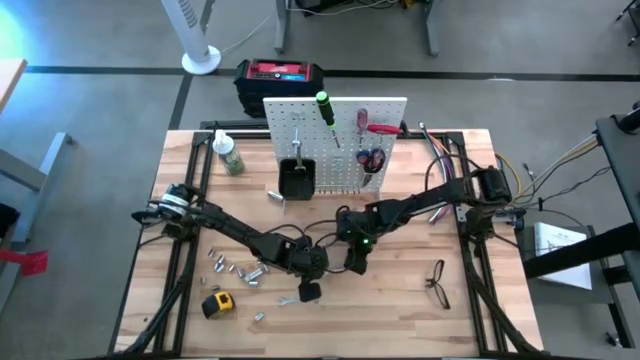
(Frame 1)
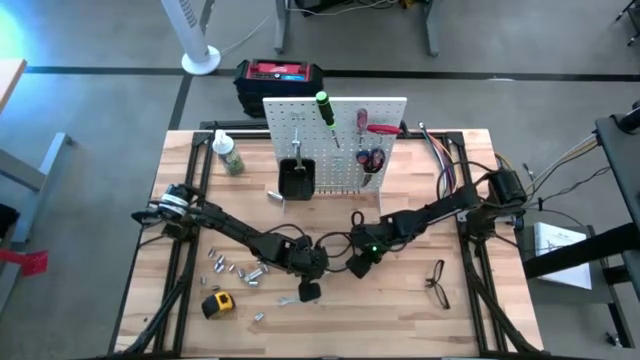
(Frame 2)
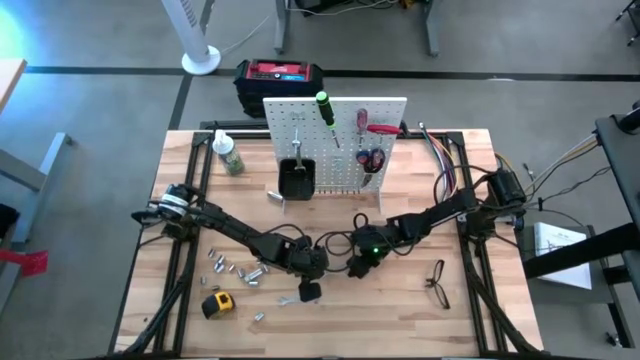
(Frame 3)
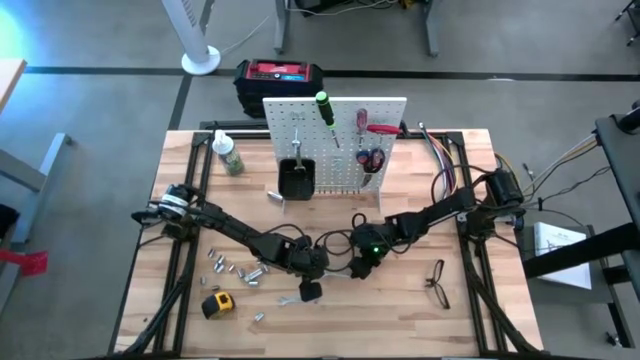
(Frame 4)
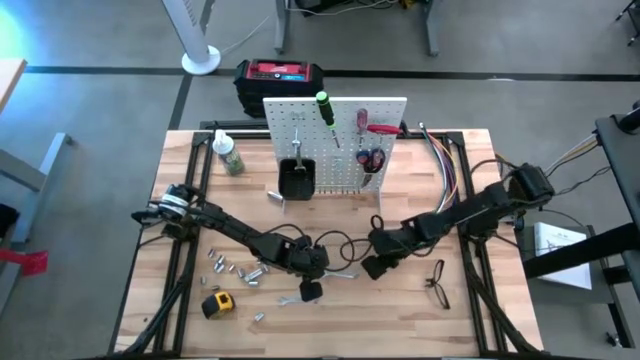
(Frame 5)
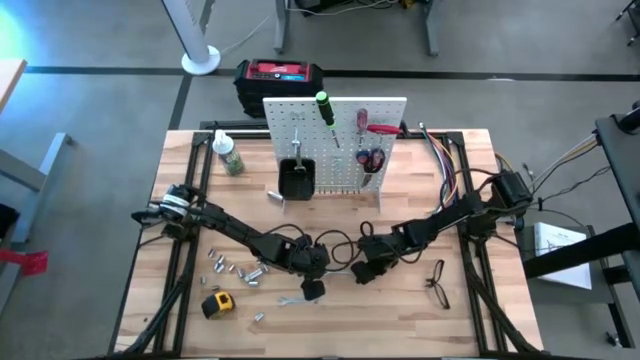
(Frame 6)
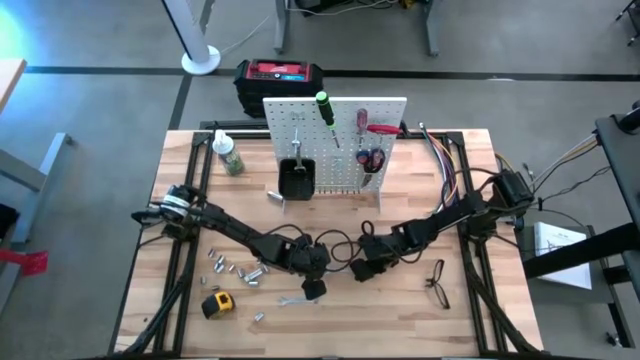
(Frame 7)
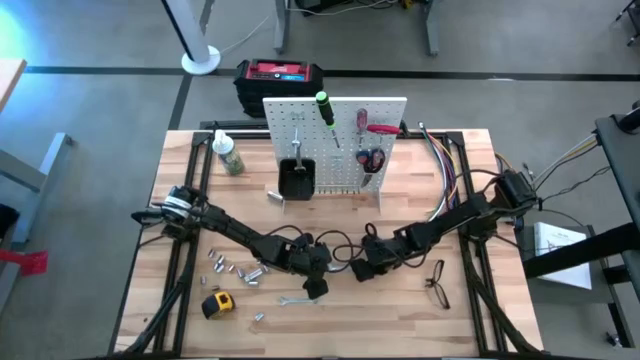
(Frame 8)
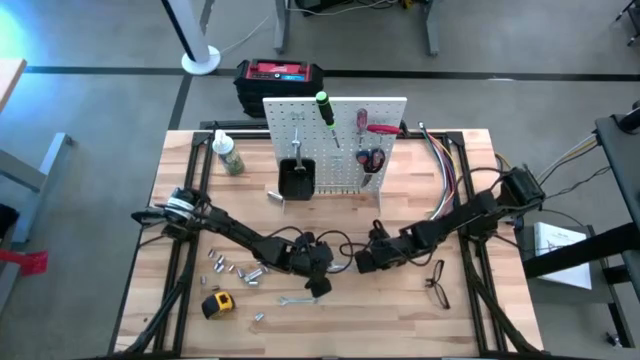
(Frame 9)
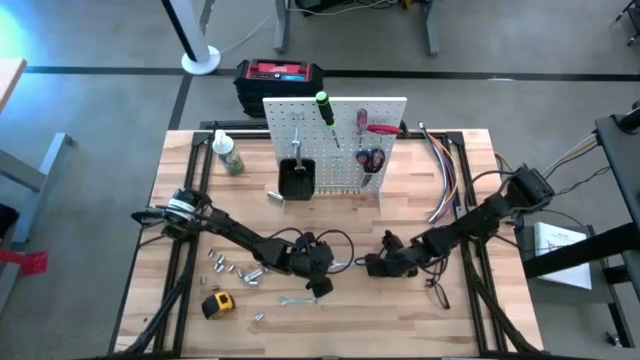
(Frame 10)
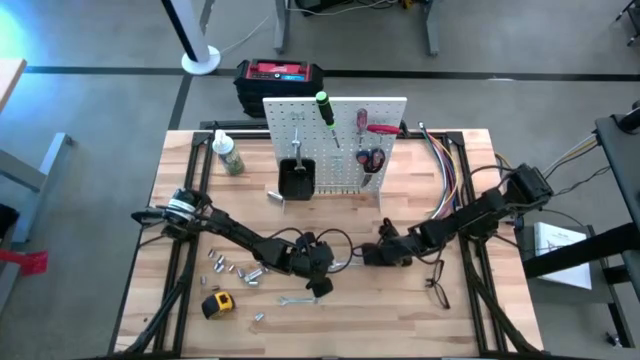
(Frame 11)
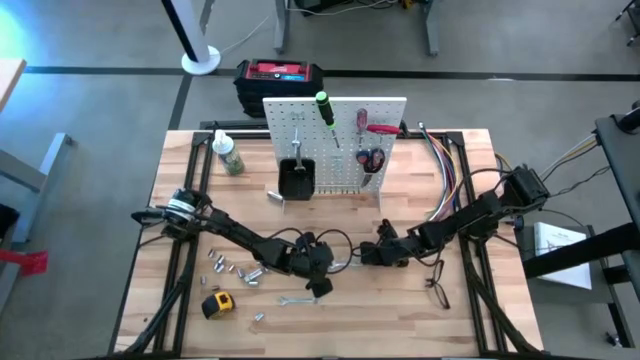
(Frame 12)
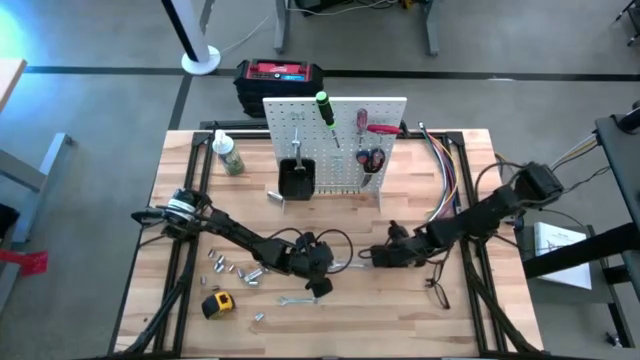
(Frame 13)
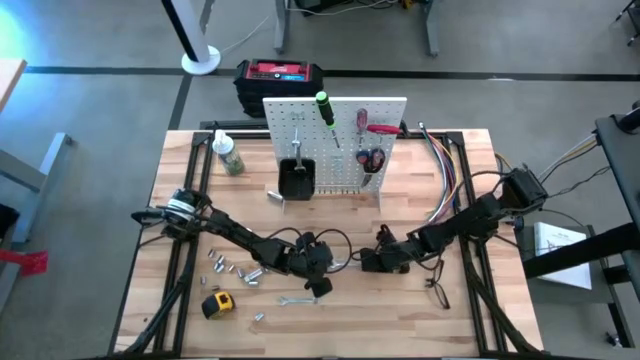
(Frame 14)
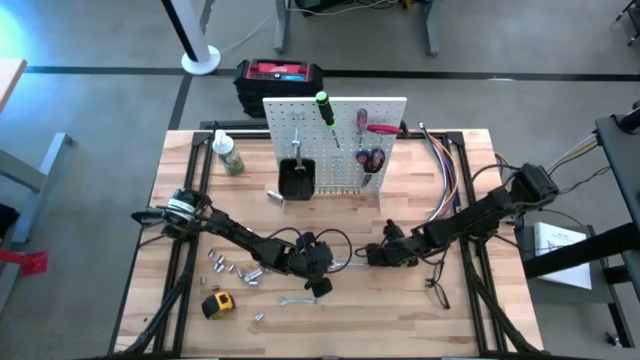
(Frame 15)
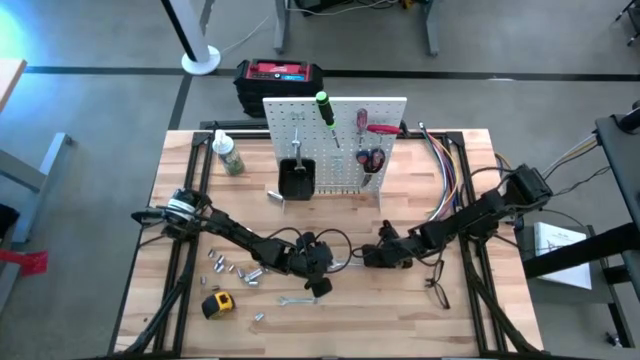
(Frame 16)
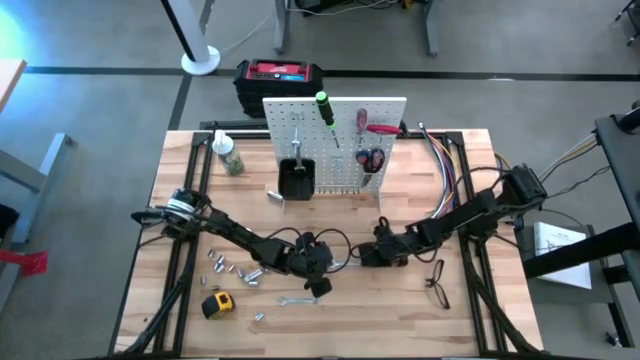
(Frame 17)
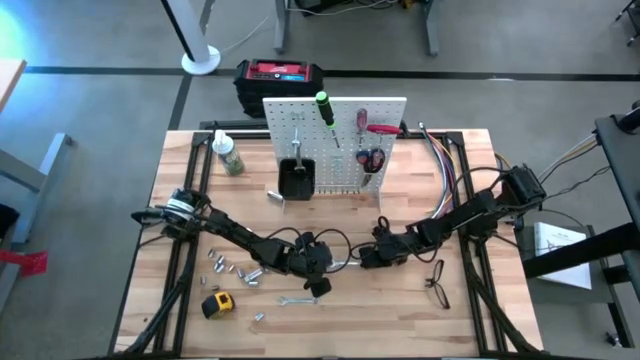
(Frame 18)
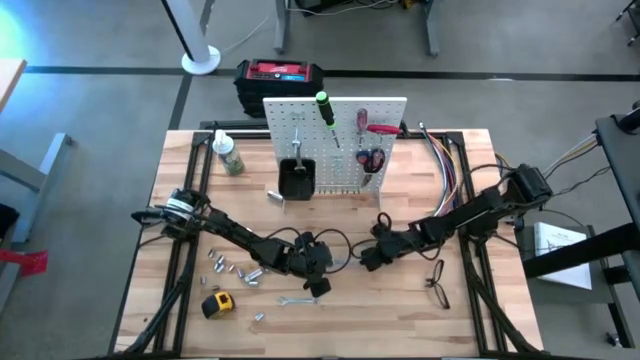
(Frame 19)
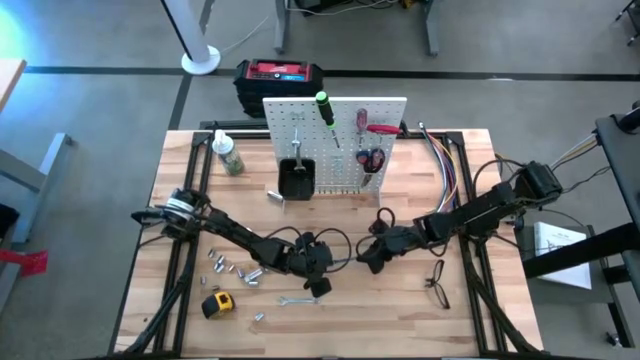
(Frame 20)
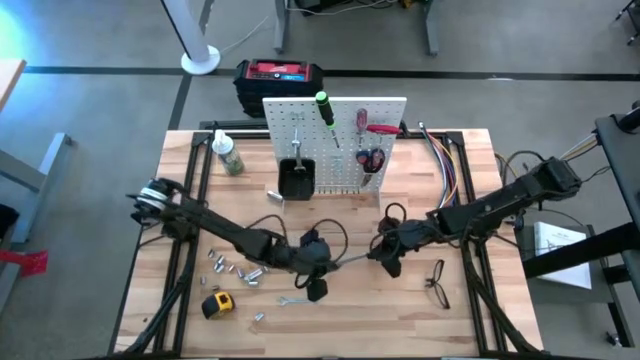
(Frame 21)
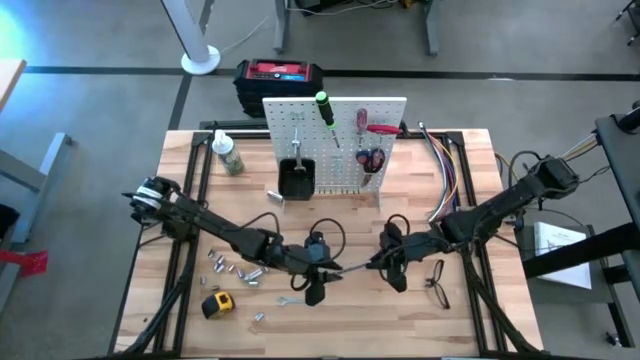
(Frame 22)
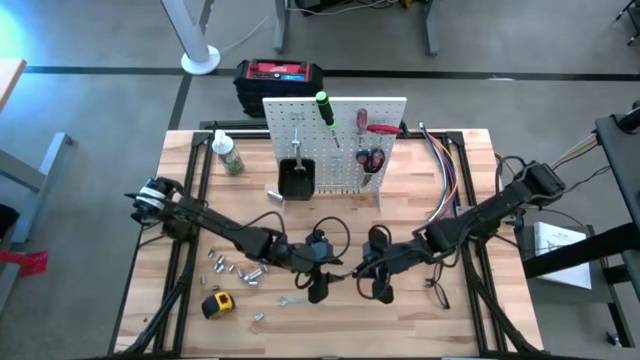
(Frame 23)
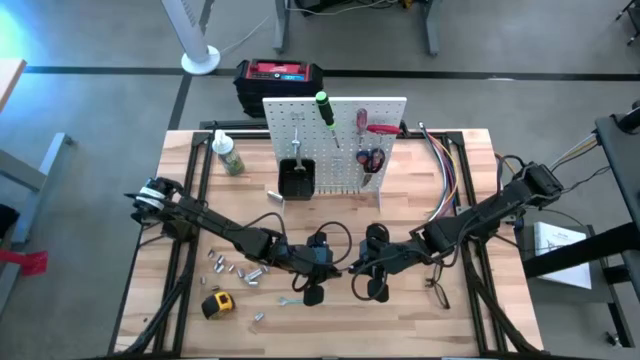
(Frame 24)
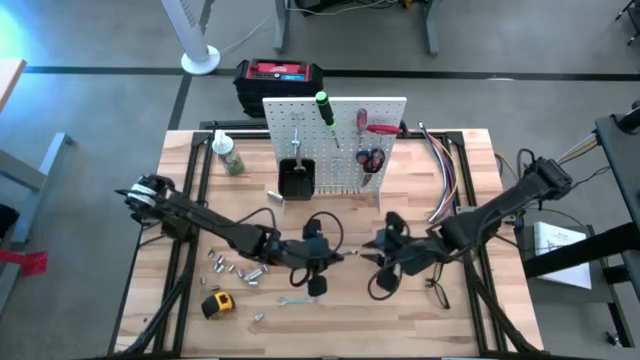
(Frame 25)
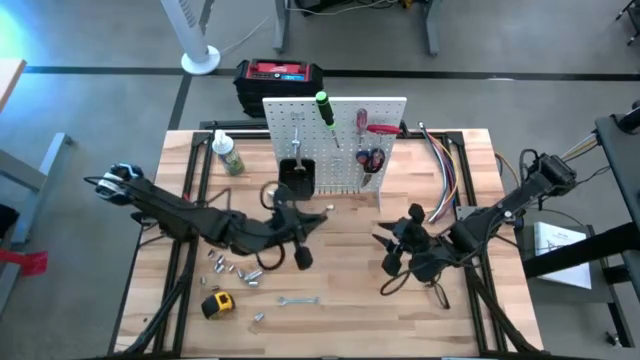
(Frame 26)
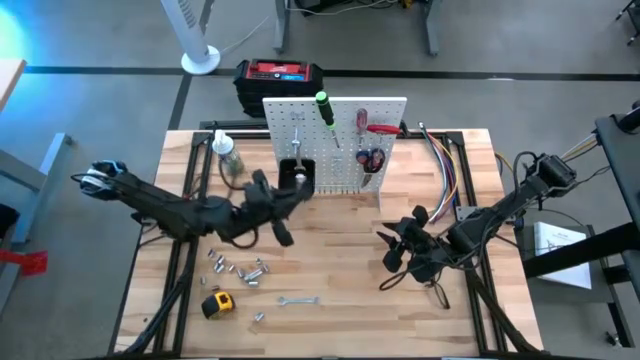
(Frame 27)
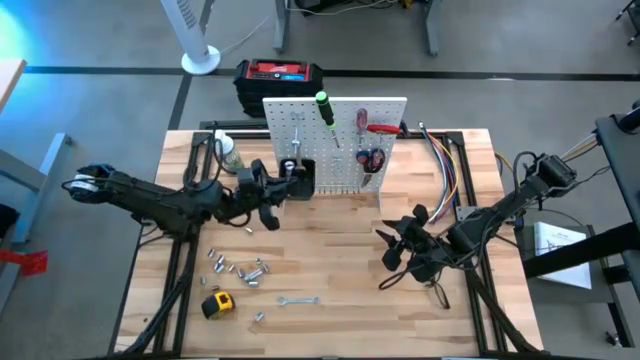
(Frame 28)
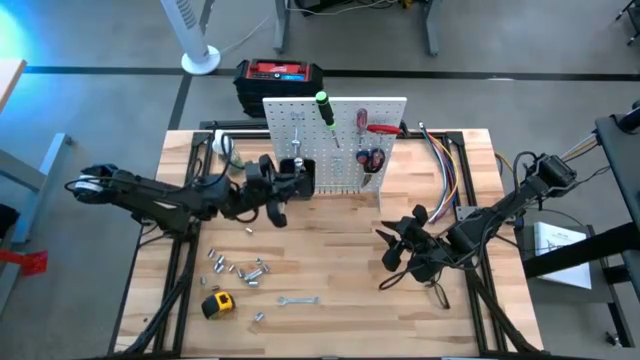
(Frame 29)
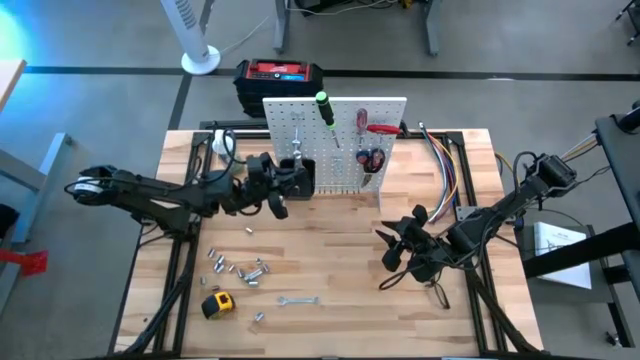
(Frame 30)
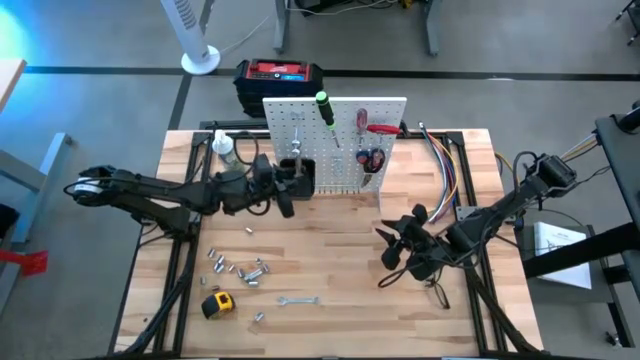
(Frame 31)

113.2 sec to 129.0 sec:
Task: Hang tools onto peg board
Hang the wrench on the pegboard

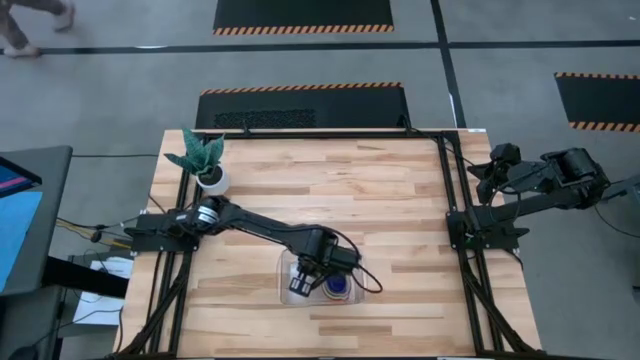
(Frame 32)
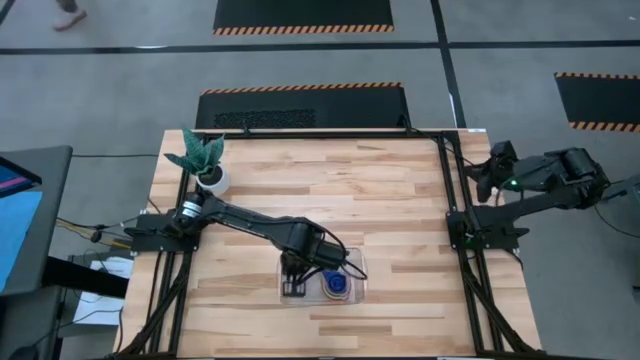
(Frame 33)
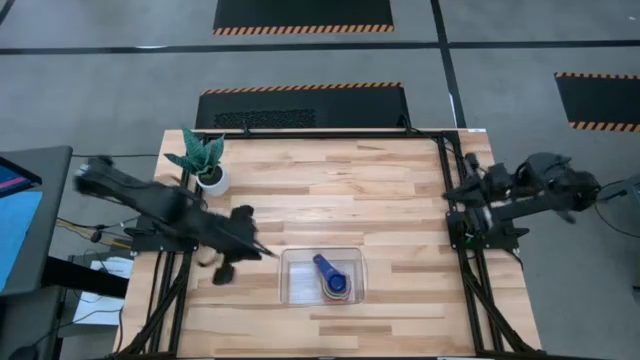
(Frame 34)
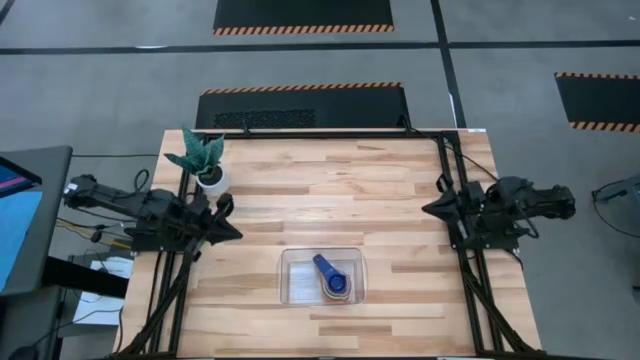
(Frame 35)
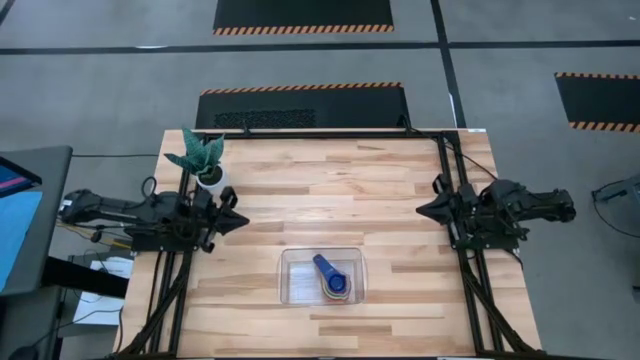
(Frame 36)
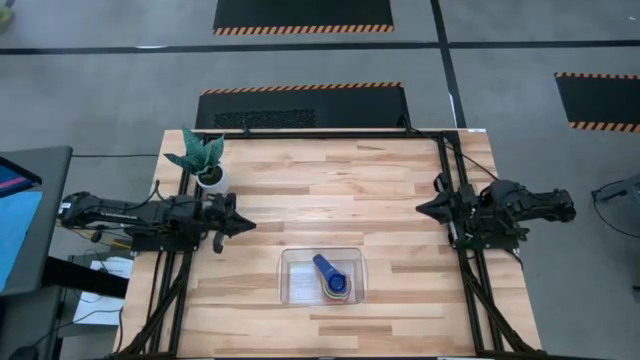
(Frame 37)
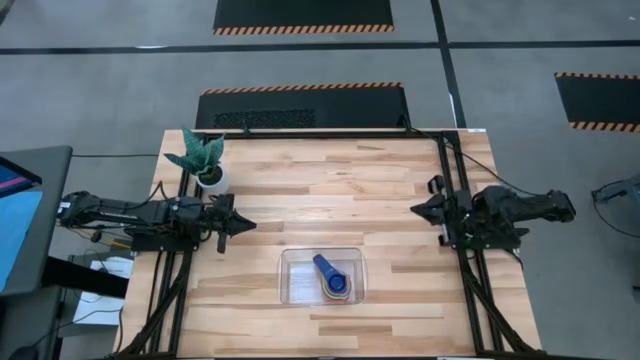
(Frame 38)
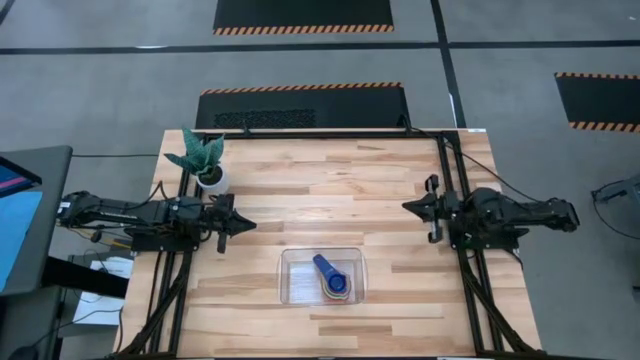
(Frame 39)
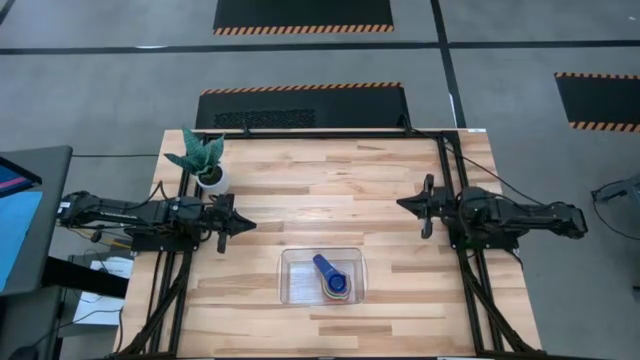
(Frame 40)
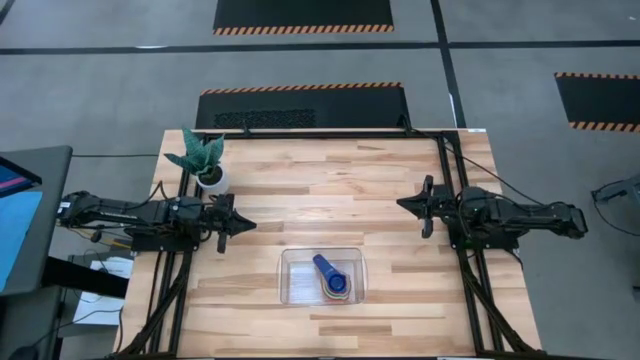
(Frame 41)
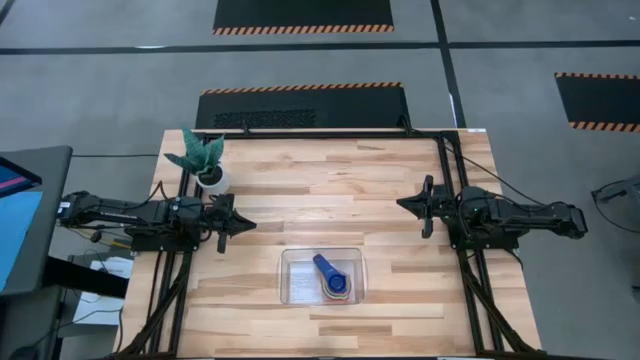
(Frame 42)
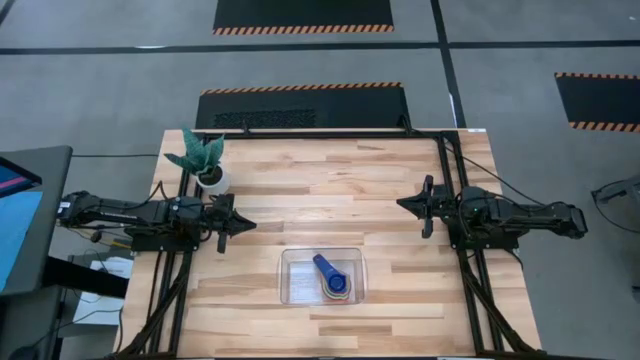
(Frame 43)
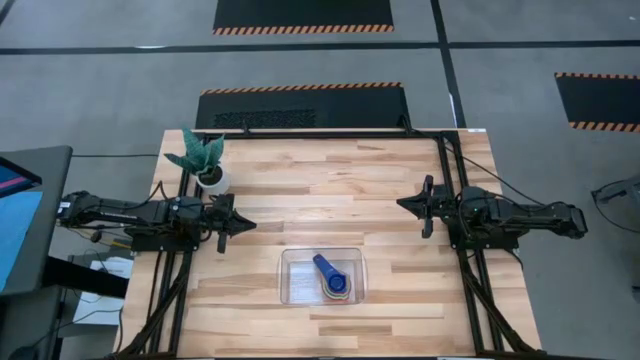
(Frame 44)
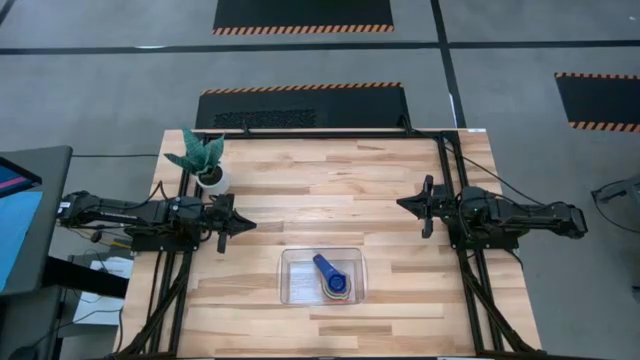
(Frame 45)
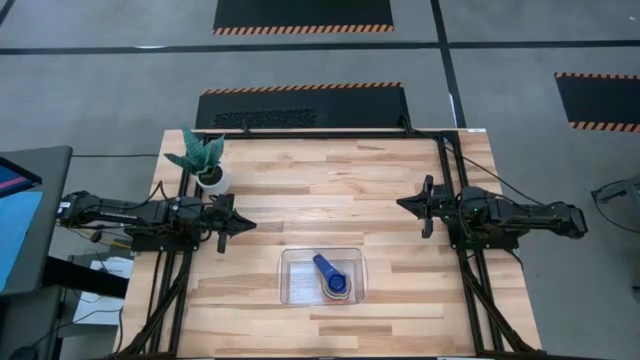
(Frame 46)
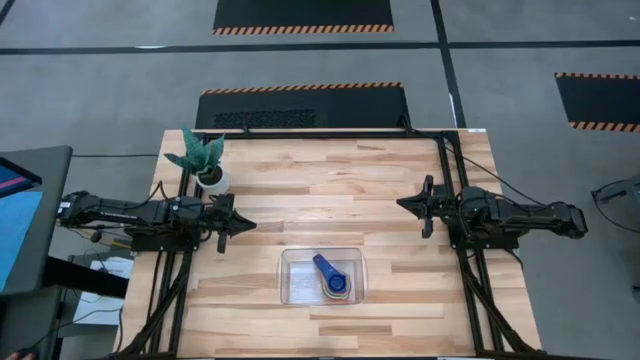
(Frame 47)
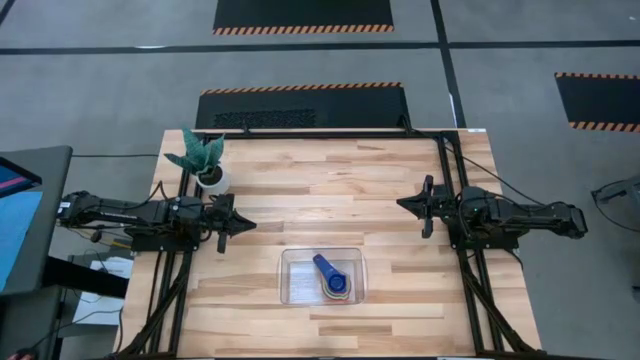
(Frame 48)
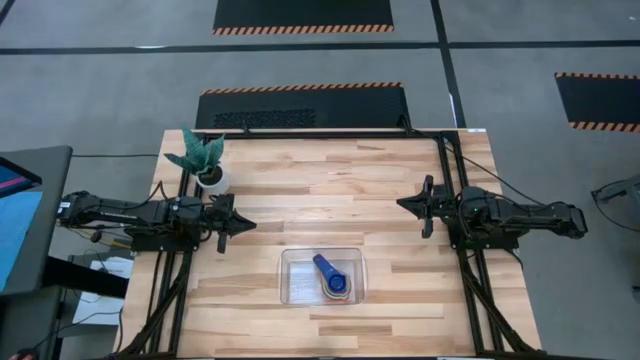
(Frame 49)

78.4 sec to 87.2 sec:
Task: Nest measuring cups in basket
Return to Home Position
